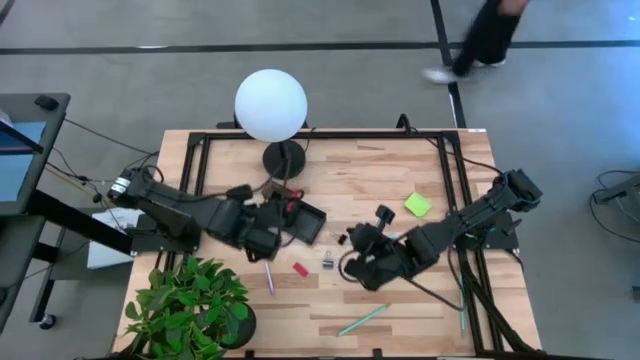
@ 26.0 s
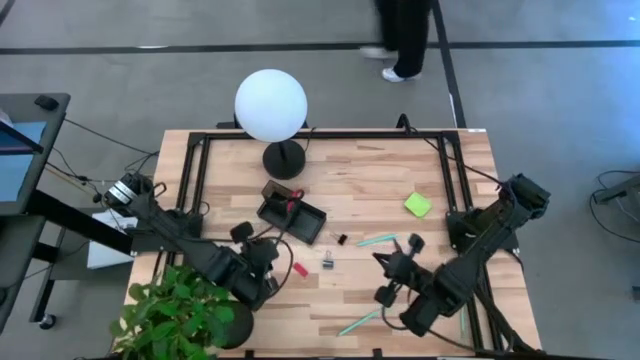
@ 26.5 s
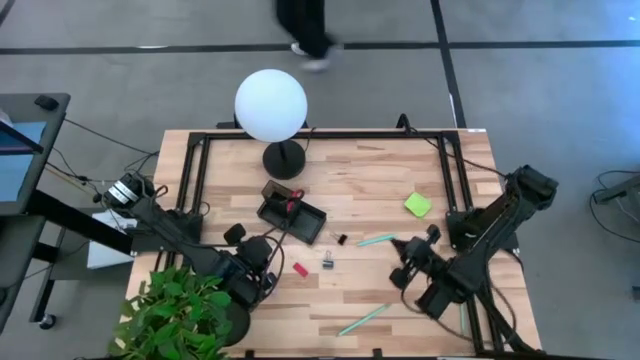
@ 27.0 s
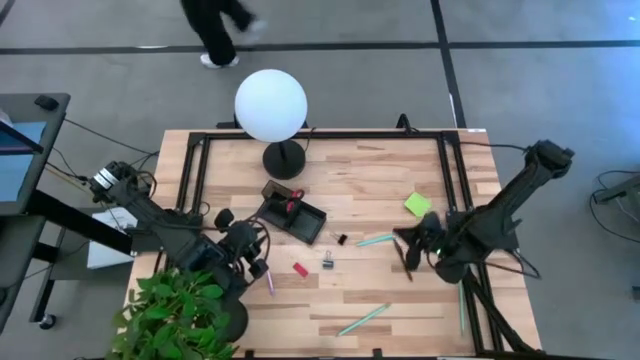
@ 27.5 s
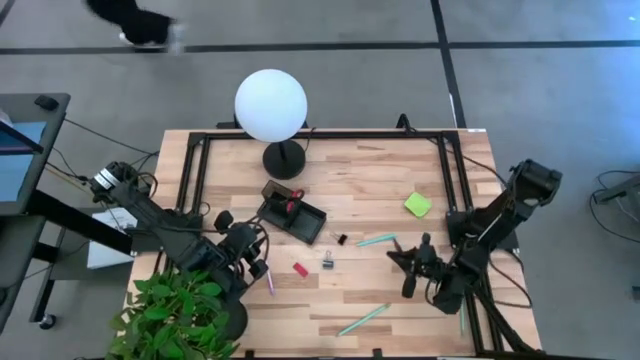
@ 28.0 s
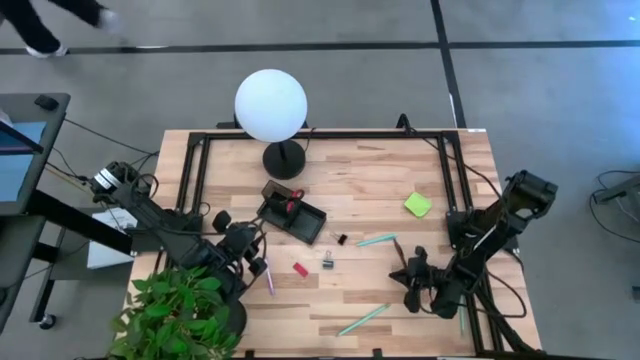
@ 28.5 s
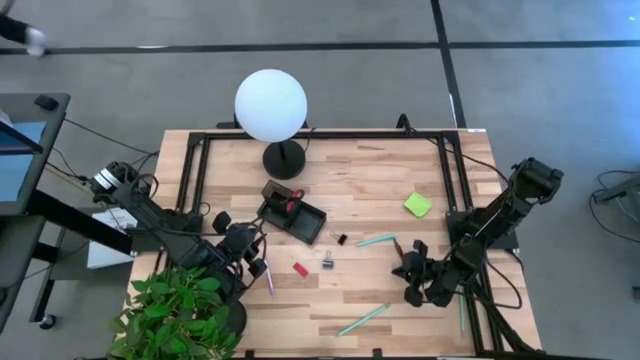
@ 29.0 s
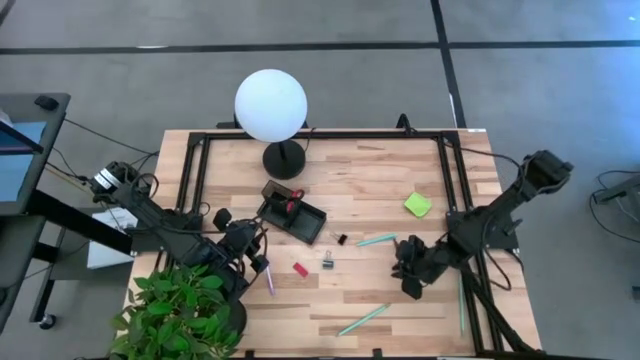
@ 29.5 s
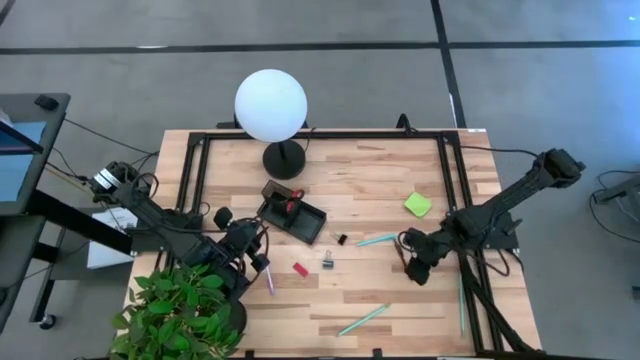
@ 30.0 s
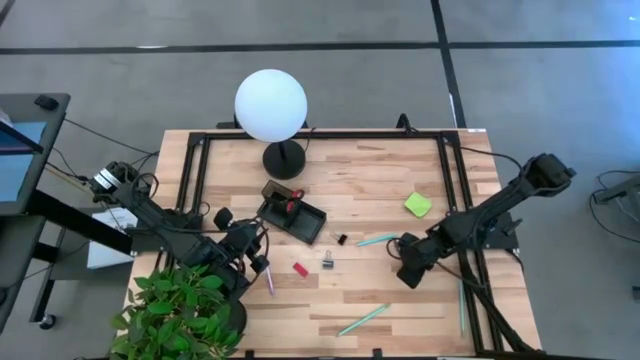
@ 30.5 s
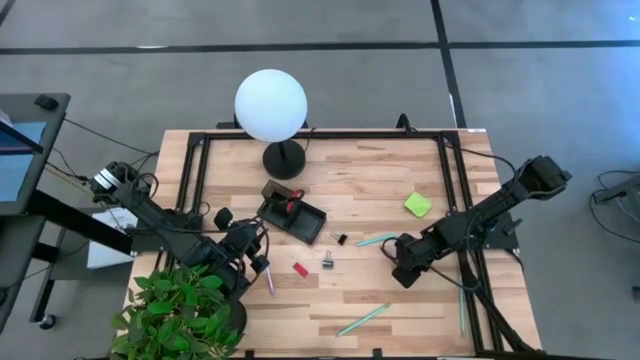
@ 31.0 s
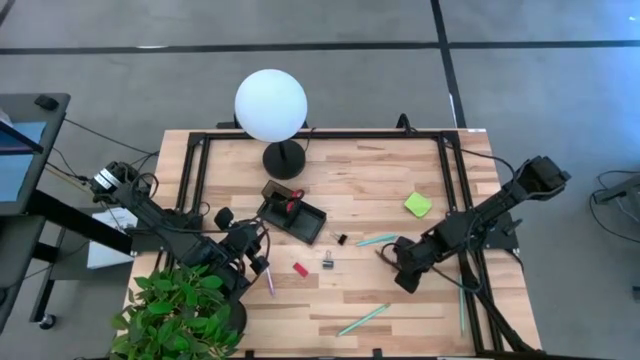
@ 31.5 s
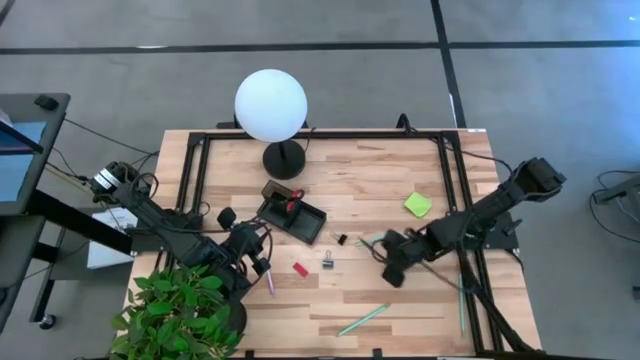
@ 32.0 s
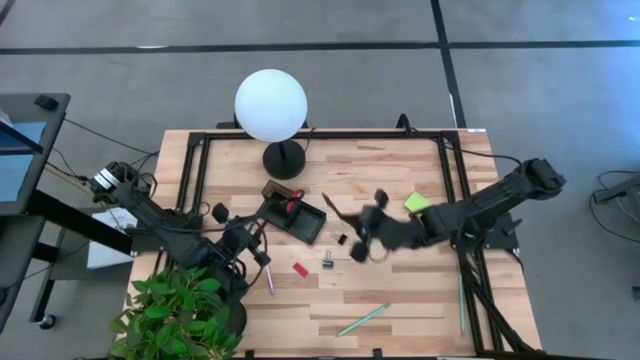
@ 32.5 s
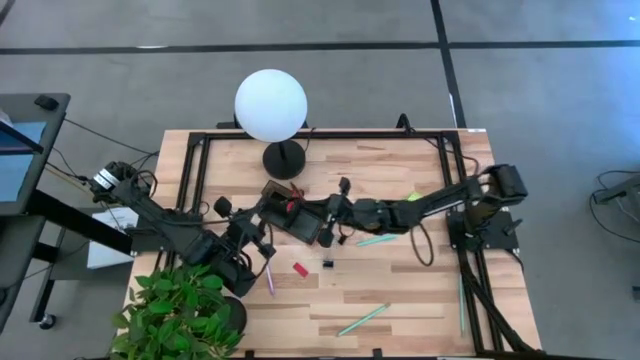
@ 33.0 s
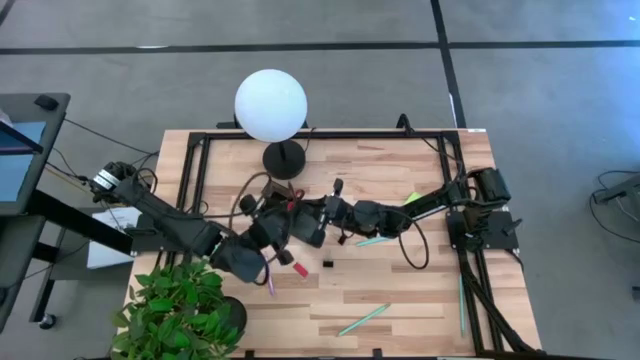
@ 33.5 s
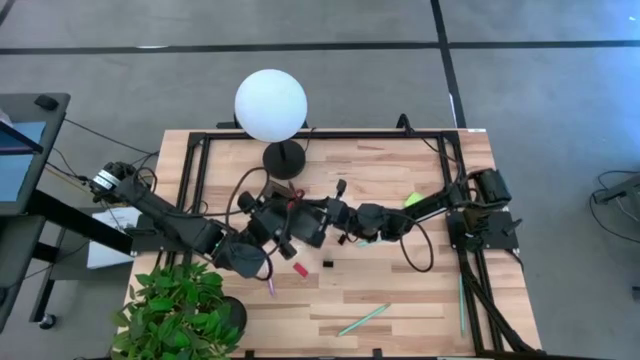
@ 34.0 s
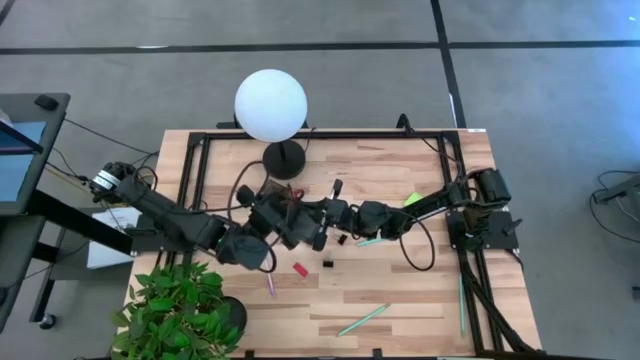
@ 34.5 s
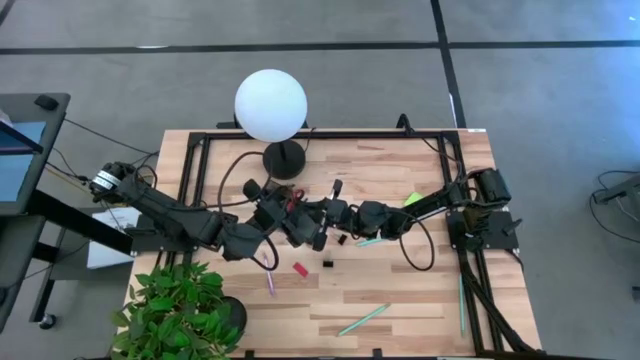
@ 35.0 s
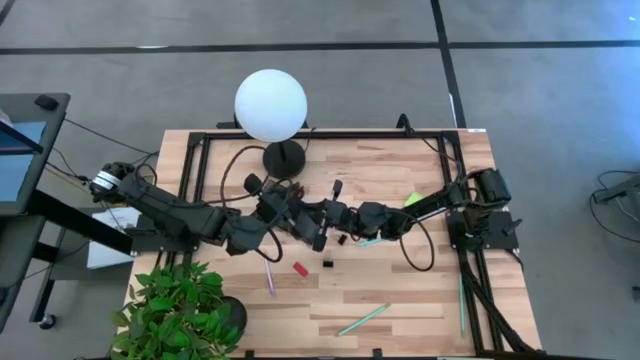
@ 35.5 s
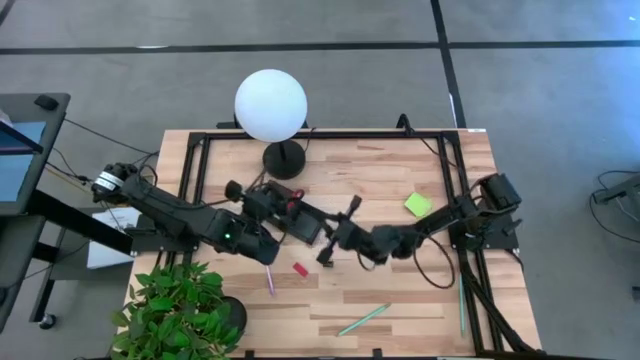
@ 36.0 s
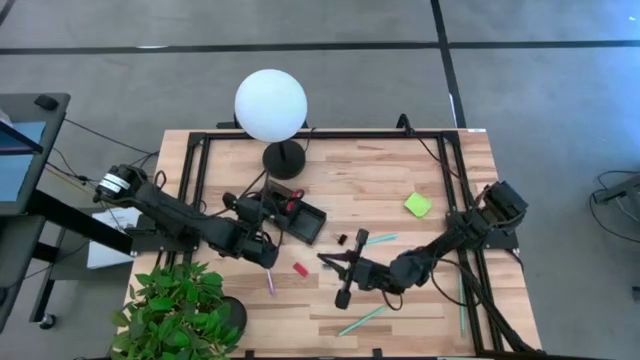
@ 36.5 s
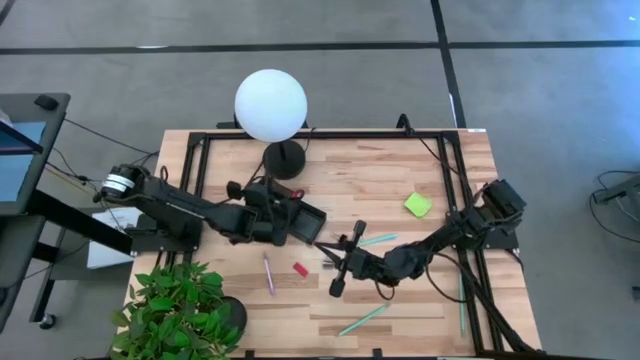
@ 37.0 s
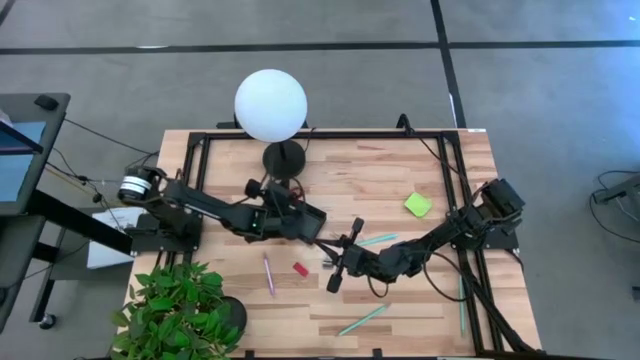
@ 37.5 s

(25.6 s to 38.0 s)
Task: Pick and place office supplies into organizer
Put the brown pen into the black desk organizer

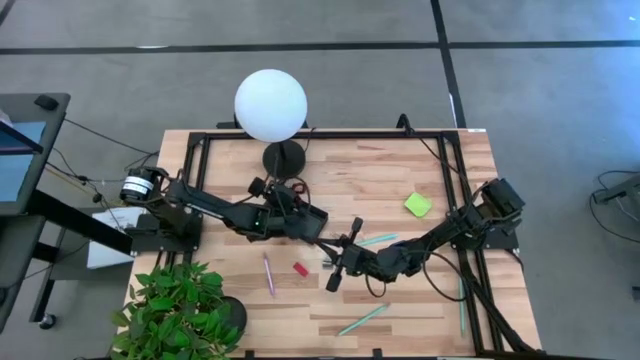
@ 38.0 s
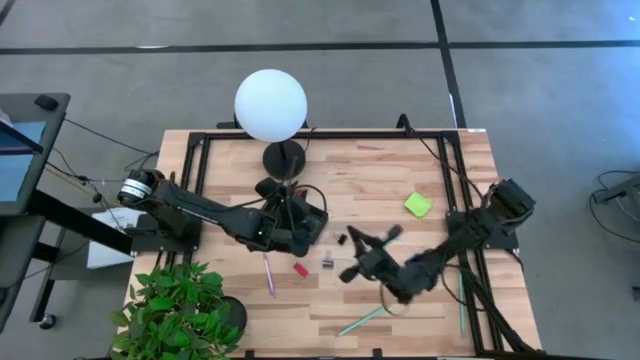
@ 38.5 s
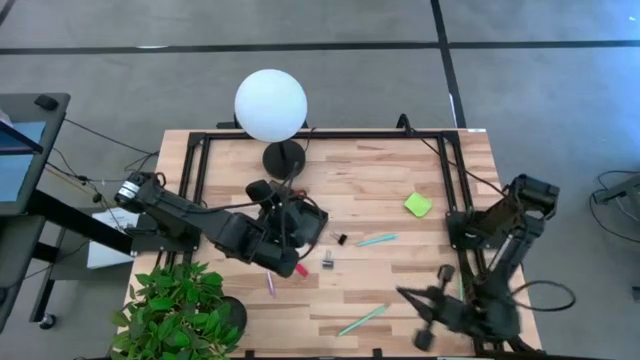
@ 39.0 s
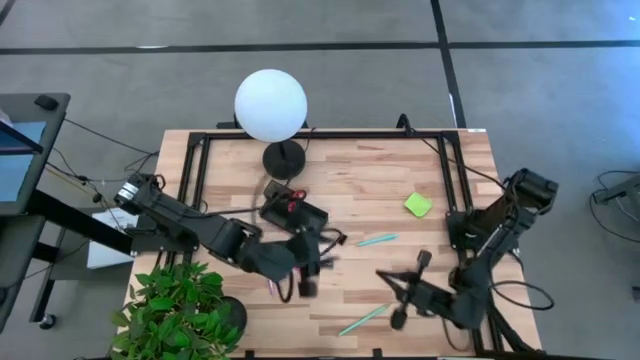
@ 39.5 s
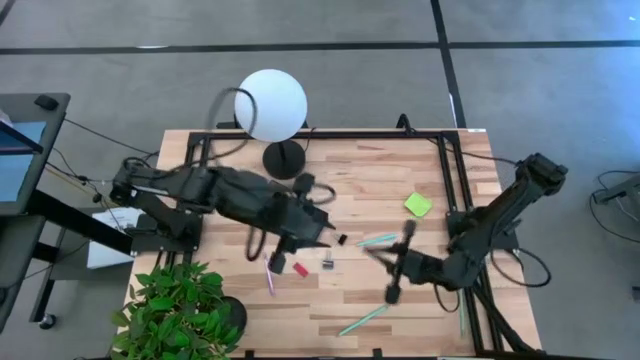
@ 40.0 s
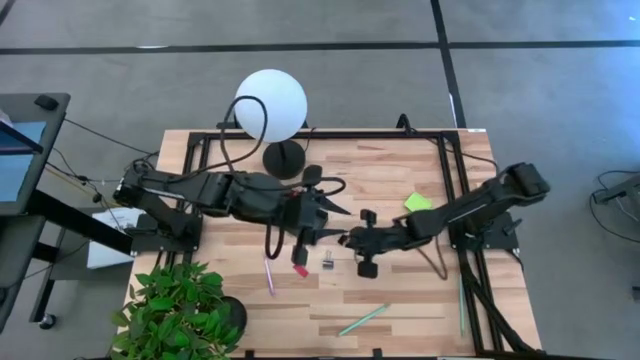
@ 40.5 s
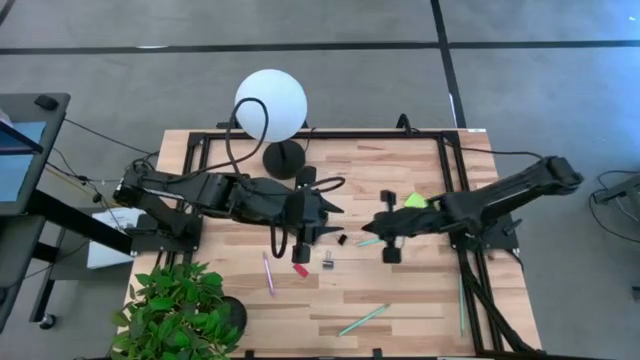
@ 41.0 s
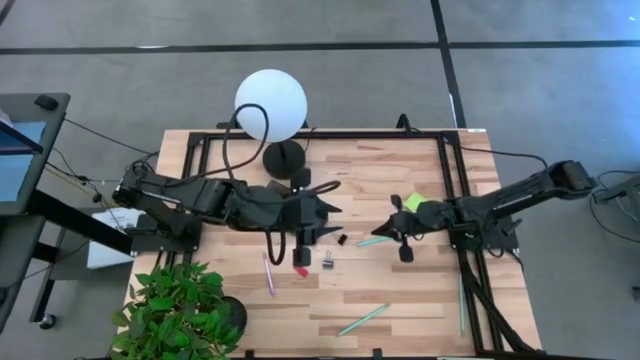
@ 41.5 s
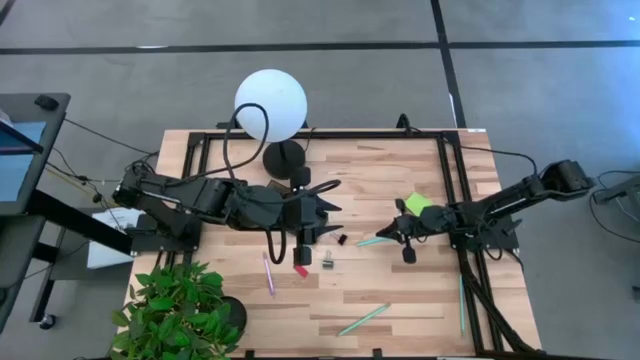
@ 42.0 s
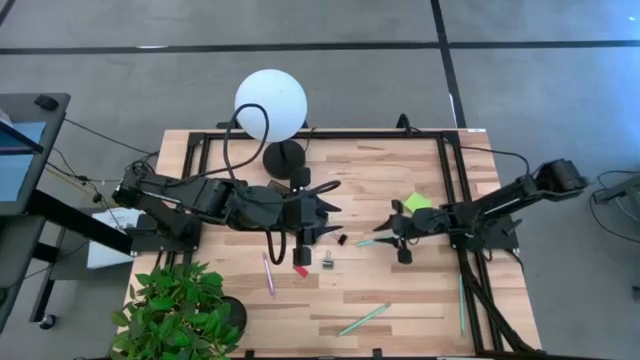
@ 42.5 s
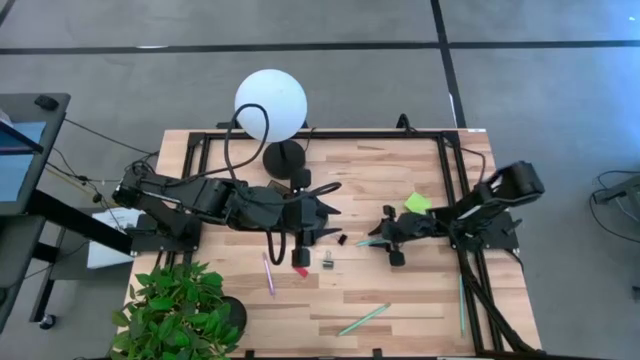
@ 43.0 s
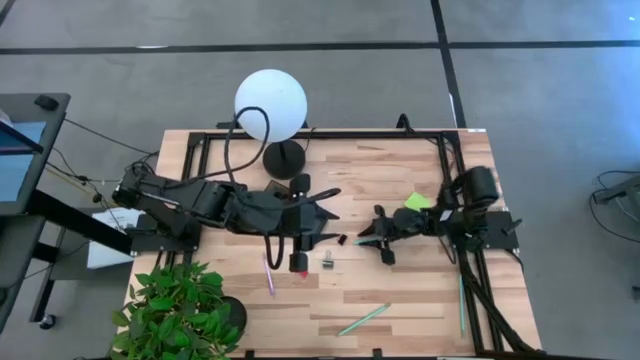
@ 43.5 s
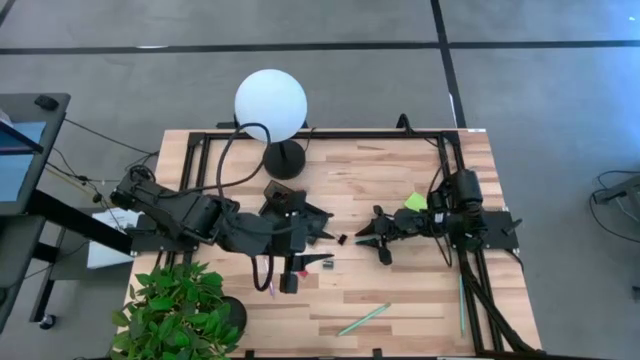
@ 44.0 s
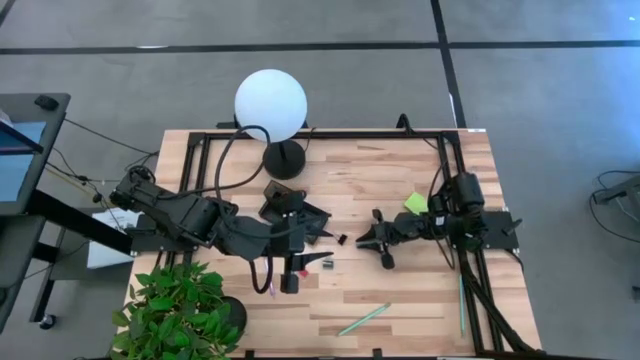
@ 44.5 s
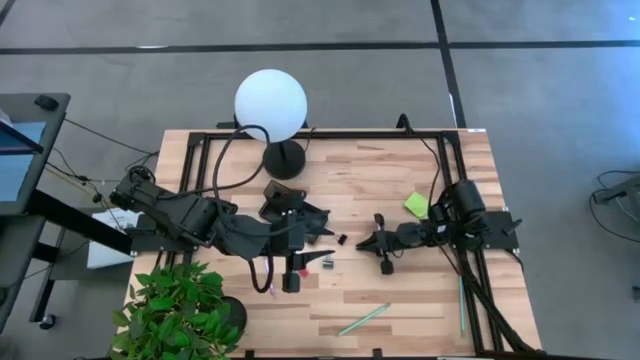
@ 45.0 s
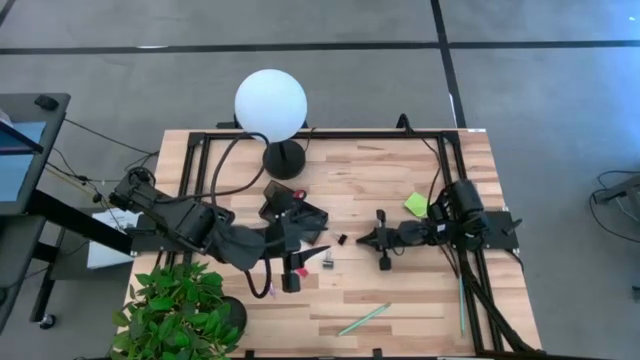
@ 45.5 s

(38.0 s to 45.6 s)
Put the blue pen into the black desk organizer

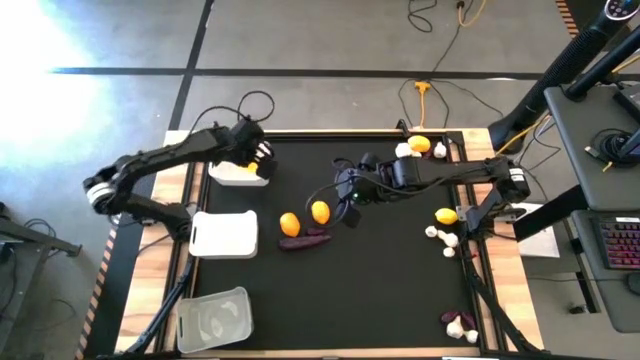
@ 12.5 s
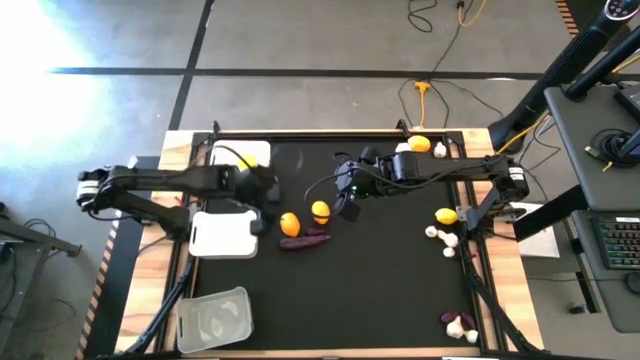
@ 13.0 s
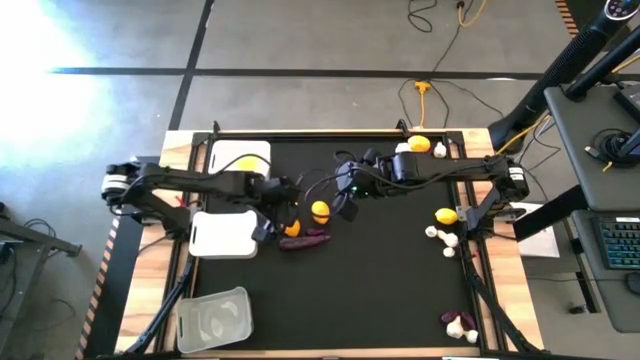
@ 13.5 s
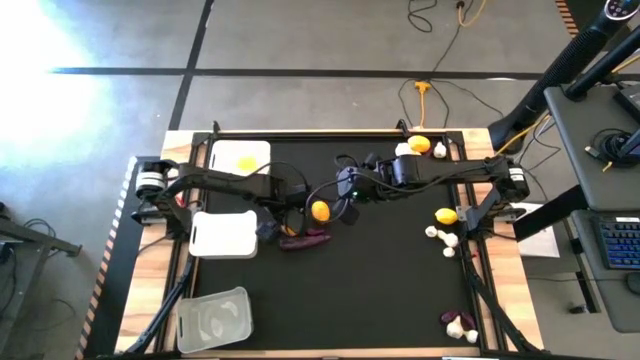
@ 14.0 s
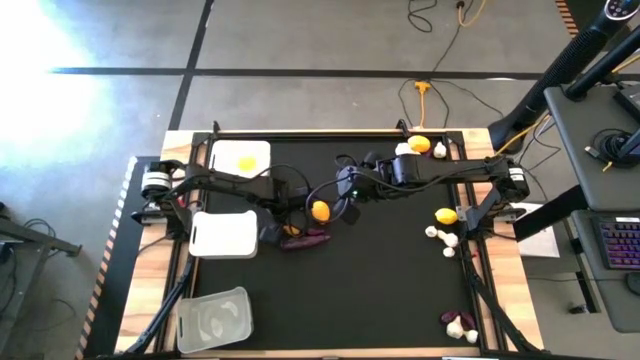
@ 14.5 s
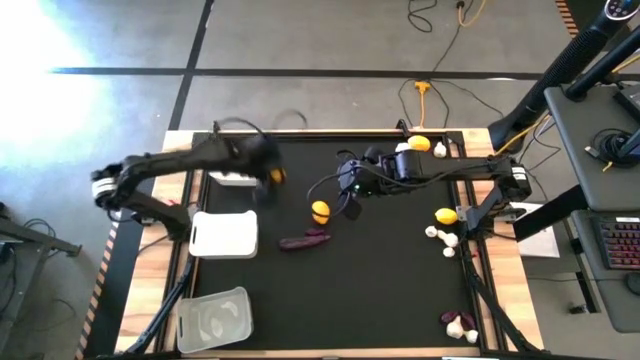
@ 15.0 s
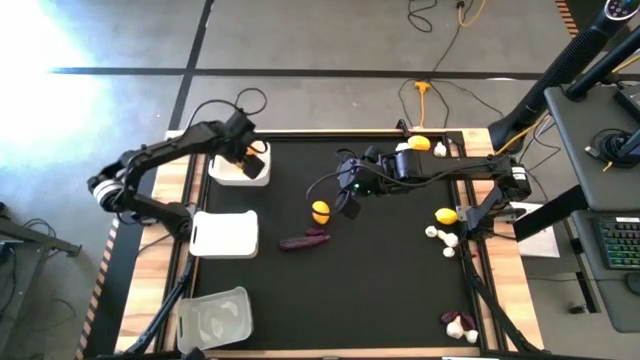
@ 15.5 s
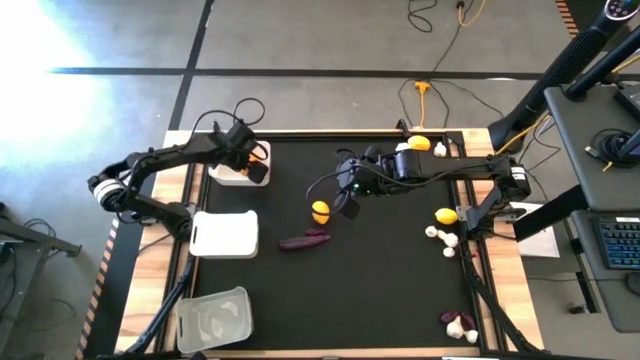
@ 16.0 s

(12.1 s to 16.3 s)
Task: Sort produce into baskets
Put the lemon into the top white bin
